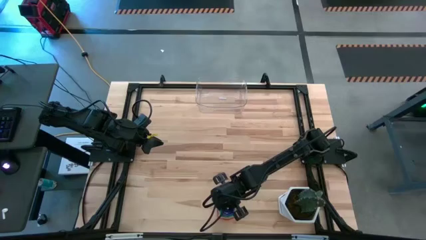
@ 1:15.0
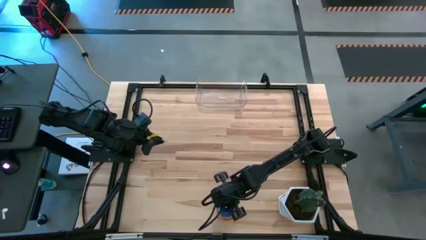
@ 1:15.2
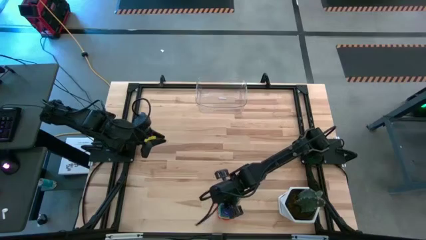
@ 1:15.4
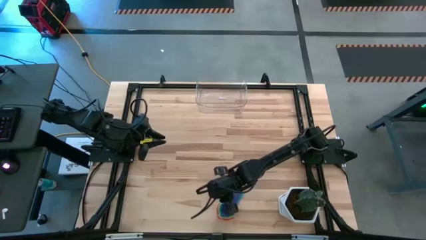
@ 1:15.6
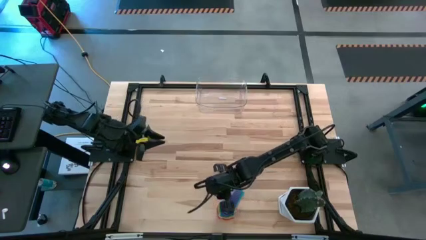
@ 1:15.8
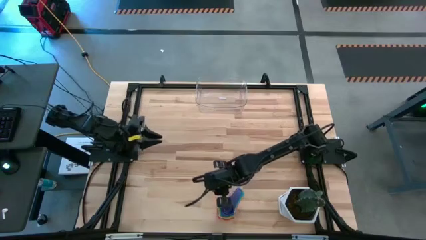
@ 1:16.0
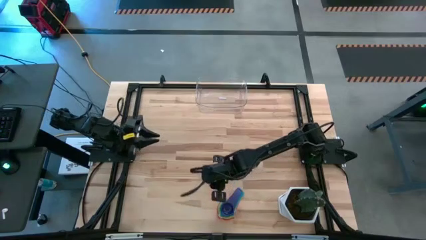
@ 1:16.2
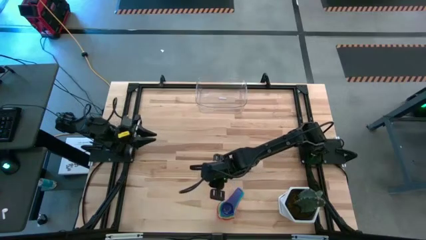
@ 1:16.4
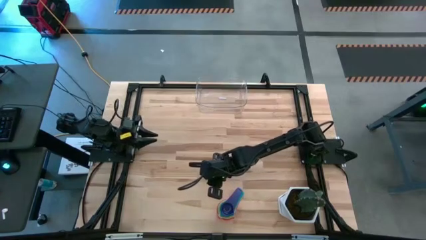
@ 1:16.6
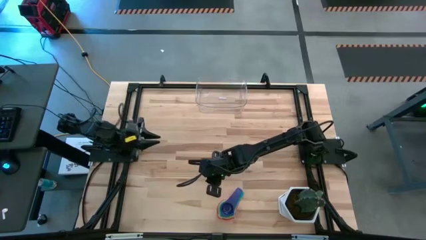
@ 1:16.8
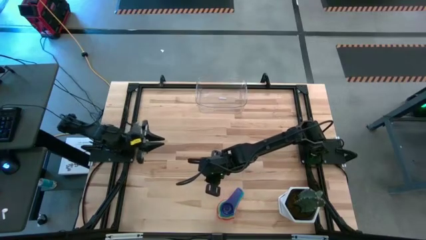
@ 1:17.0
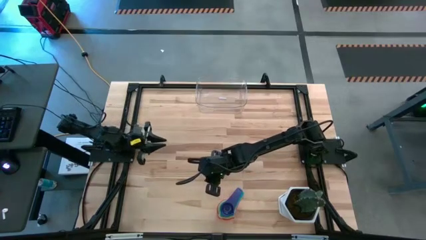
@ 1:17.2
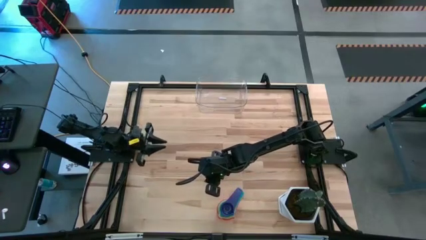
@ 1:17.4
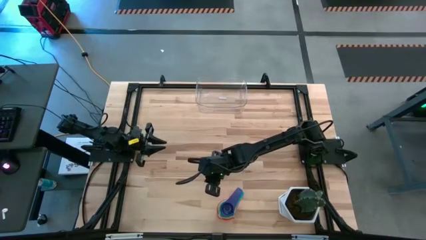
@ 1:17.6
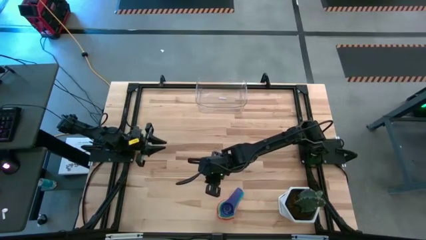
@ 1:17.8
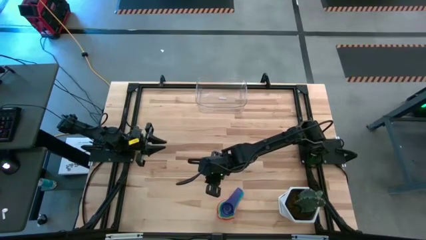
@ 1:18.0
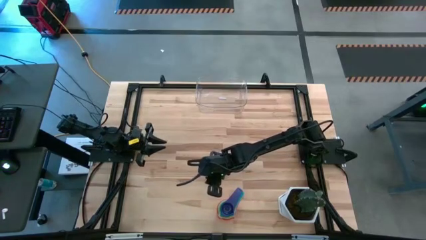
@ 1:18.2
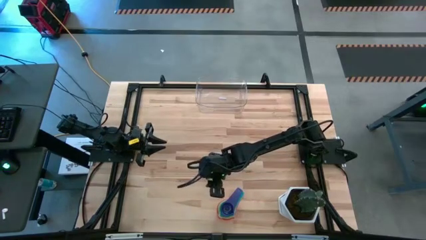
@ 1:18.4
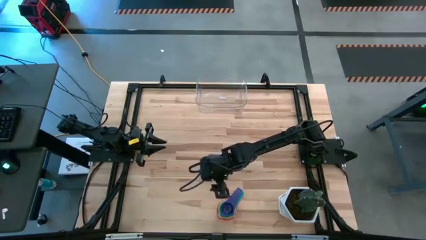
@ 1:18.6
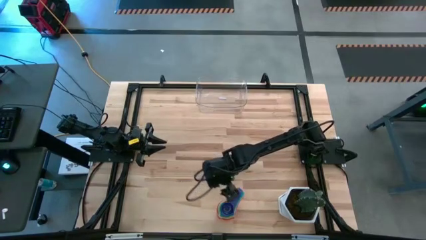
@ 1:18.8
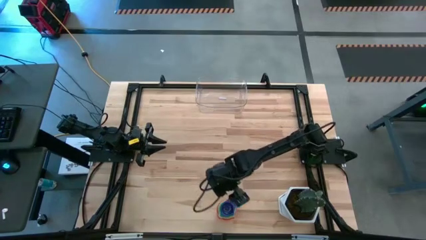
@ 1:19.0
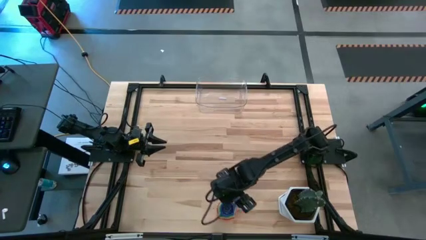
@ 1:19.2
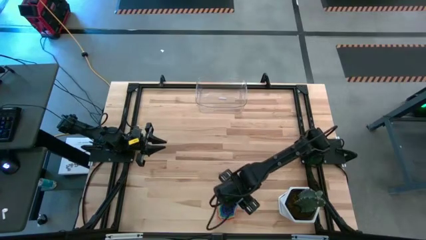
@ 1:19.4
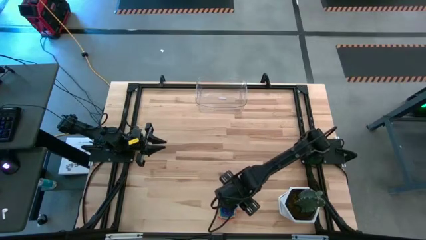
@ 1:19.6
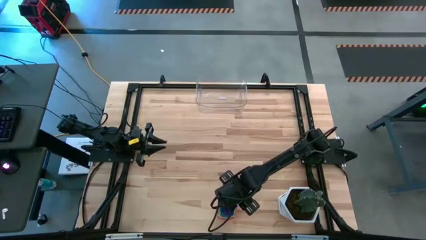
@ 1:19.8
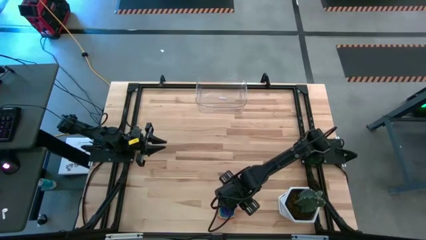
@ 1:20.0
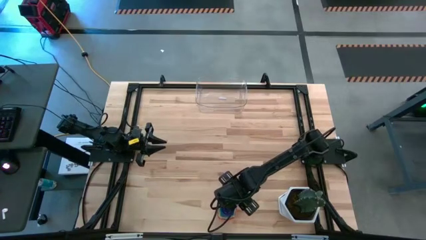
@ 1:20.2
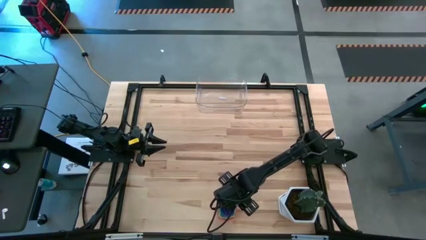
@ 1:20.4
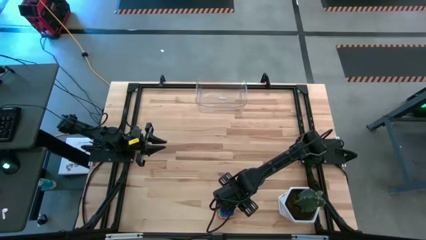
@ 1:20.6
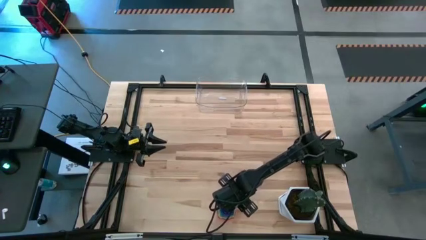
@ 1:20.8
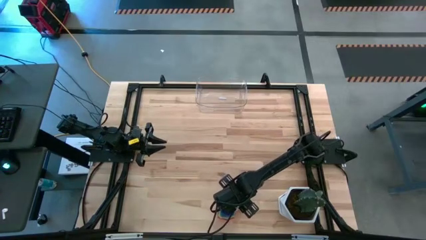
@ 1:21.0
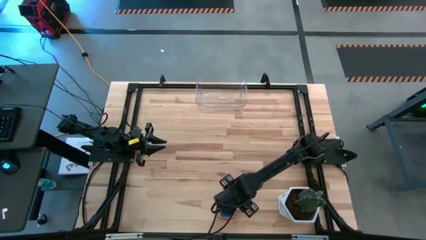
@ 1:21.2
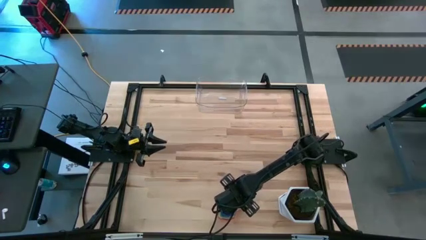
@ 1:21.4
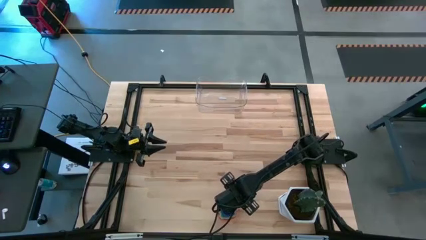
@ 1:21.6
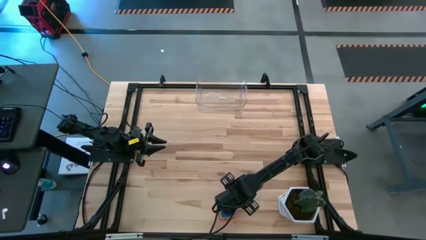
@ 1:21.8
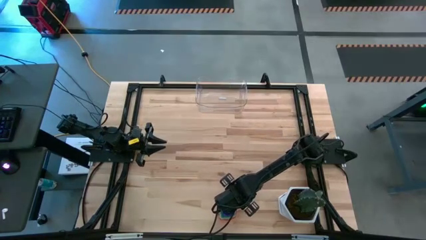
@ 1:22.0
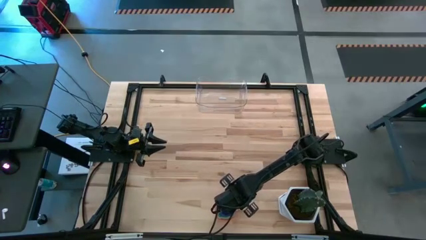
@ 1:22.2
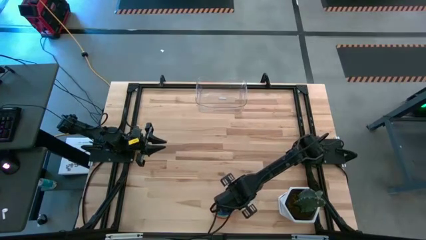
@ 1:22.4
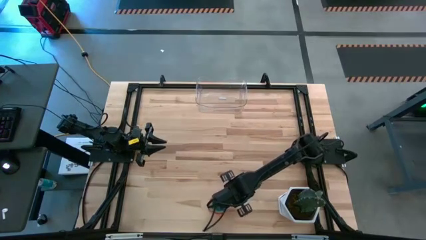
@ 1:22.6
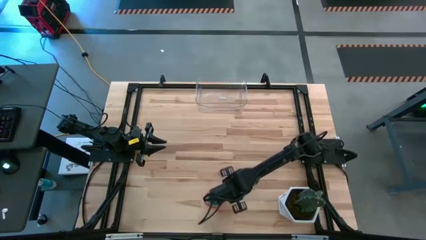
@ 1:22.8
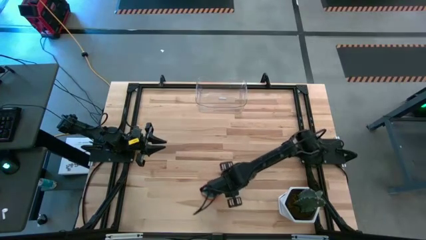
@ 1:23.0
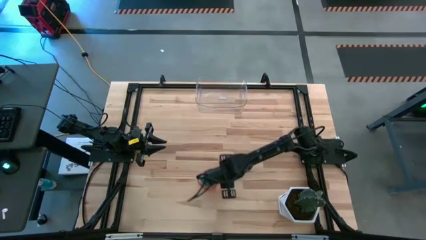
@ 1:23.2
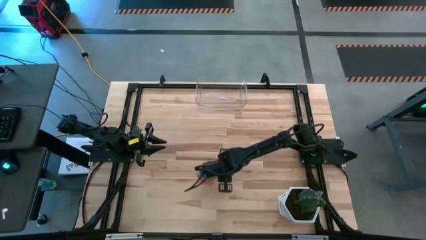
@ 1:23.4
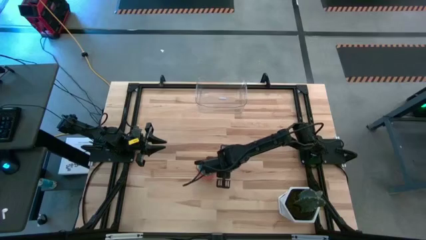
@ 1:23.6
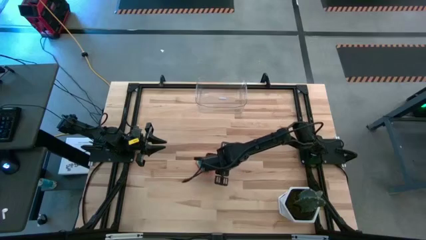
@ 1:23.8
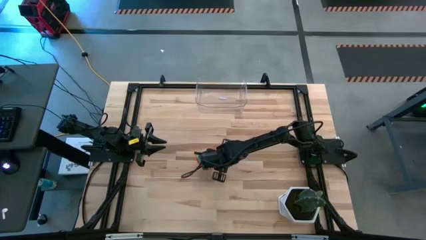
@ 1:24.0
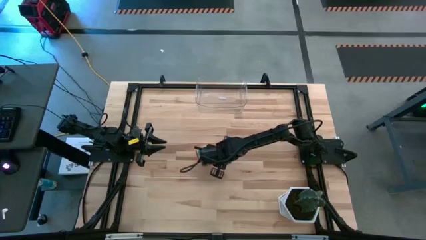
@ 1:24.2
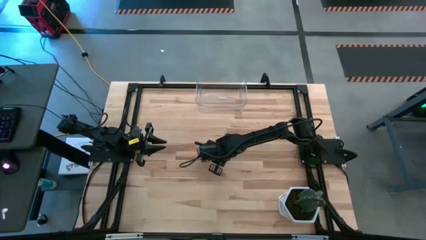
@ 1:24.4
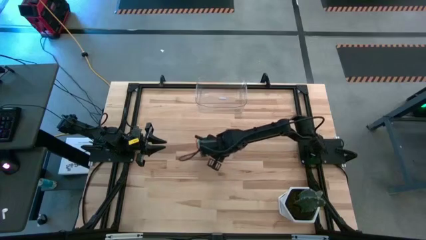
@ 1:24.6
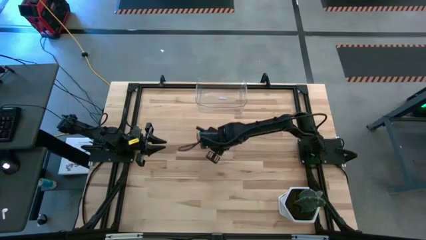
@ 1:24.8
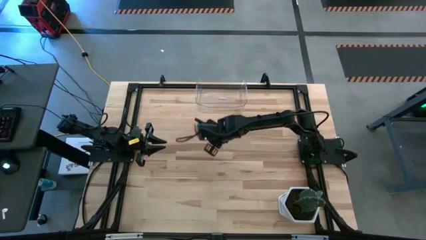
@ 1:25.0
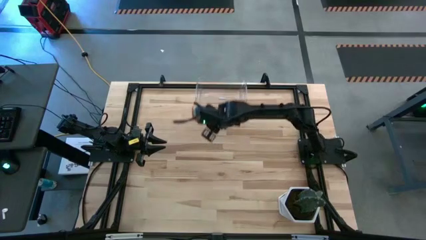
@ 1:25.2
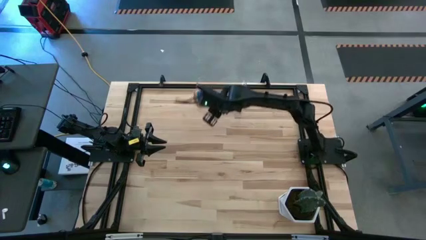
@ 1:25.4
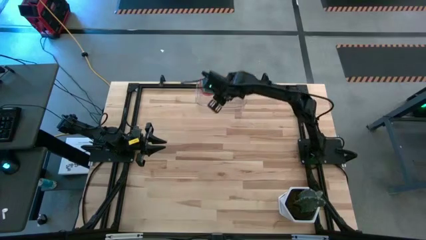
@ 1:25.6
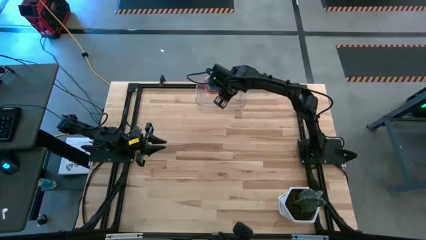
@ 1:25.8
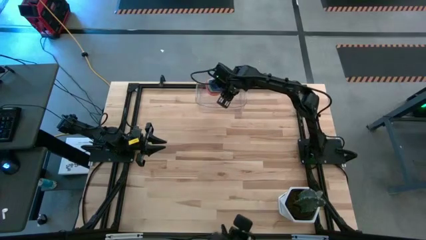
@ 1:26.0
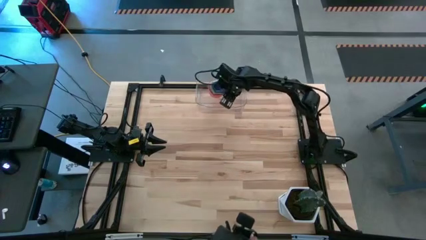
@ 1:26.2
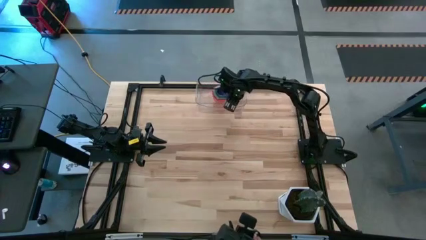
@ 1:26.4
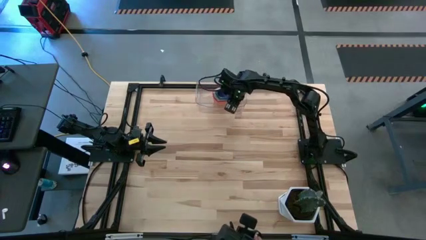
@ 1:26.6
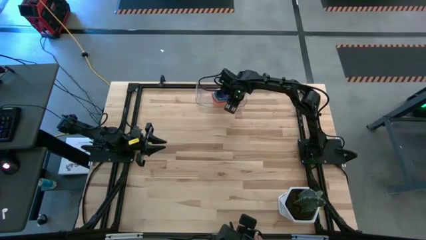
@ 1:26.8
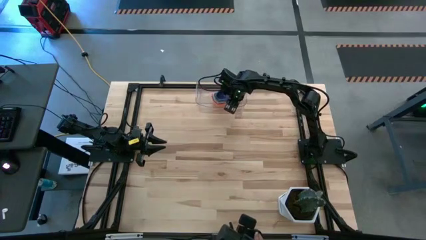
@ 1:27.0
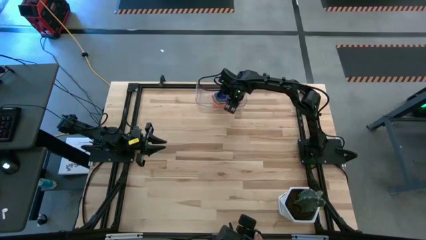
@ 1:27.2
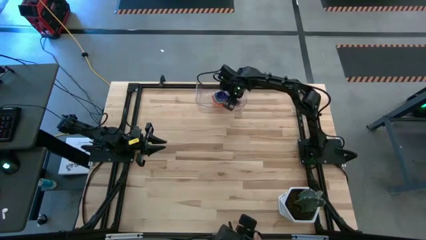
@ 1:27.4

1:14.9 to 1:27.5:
Task: Nest measuring cups in basket
Put the stacked measuring cups into the transparent bin

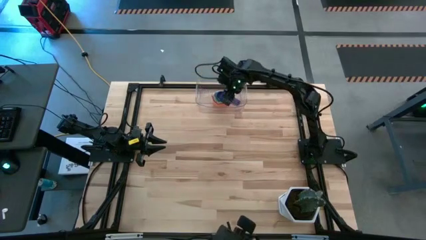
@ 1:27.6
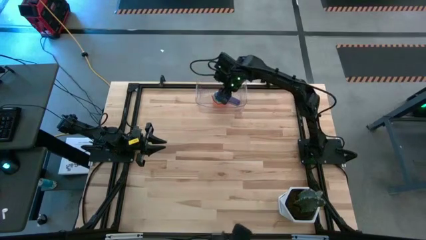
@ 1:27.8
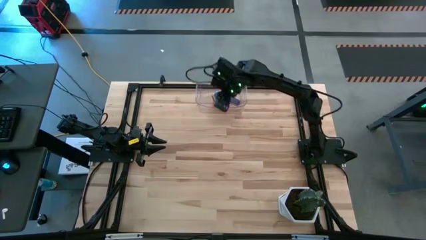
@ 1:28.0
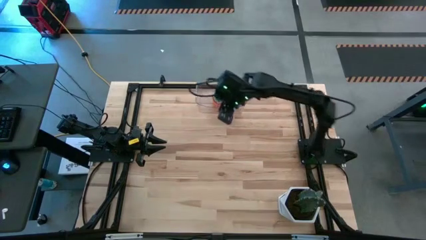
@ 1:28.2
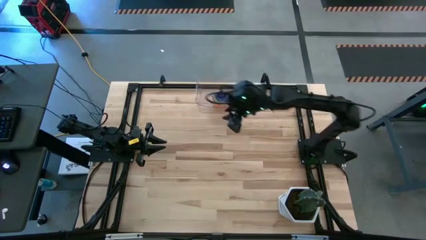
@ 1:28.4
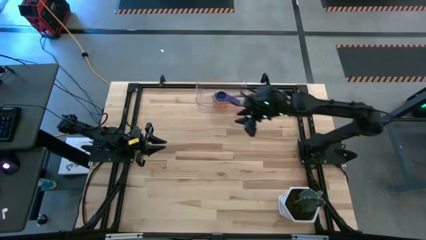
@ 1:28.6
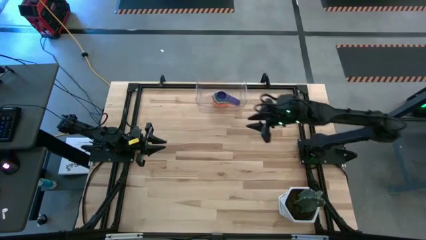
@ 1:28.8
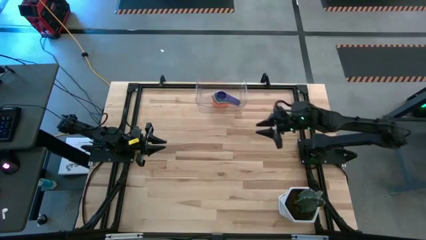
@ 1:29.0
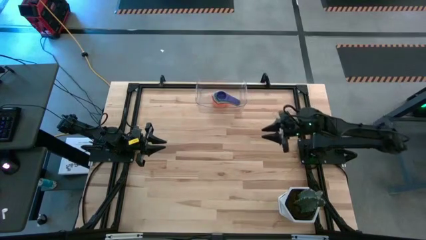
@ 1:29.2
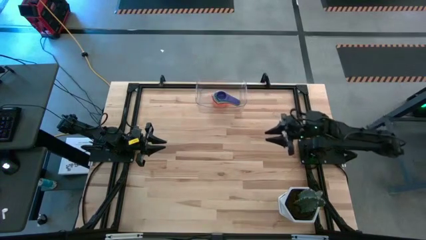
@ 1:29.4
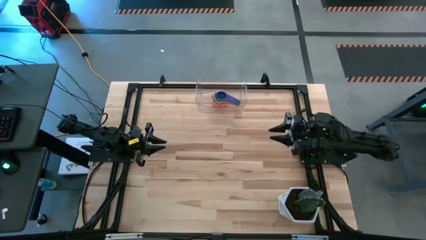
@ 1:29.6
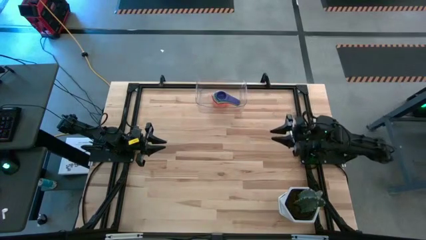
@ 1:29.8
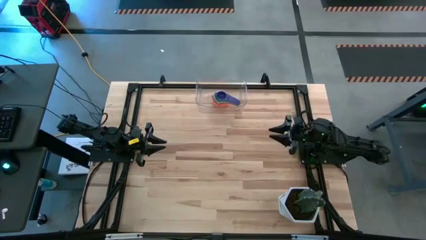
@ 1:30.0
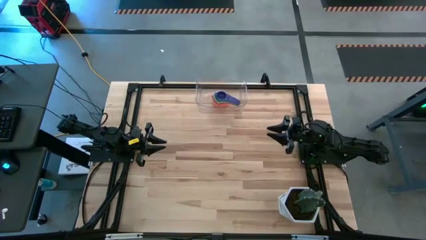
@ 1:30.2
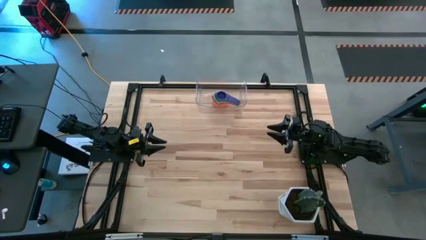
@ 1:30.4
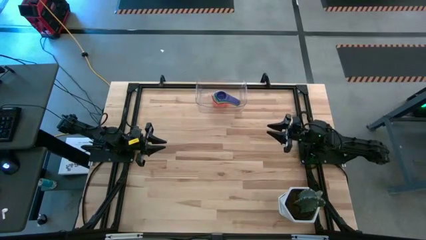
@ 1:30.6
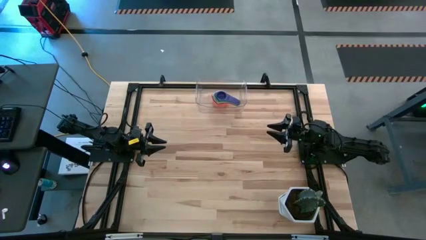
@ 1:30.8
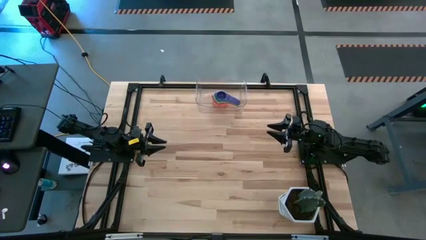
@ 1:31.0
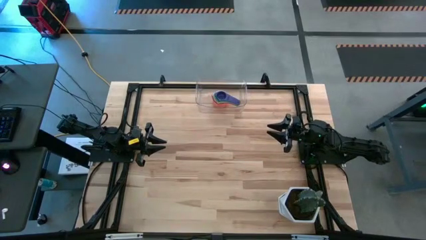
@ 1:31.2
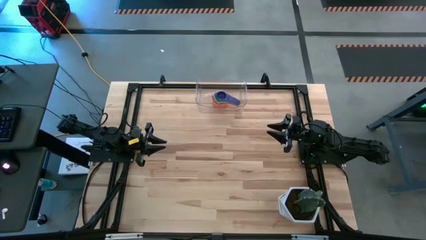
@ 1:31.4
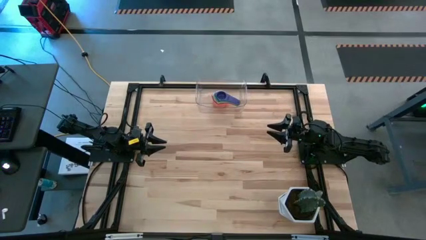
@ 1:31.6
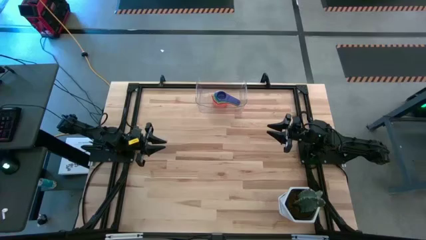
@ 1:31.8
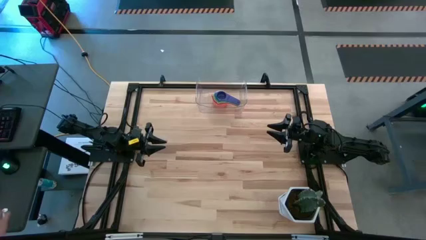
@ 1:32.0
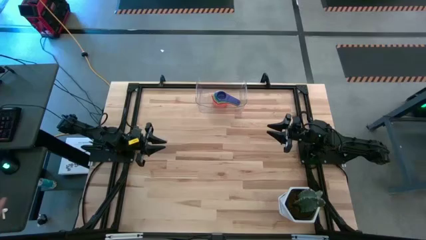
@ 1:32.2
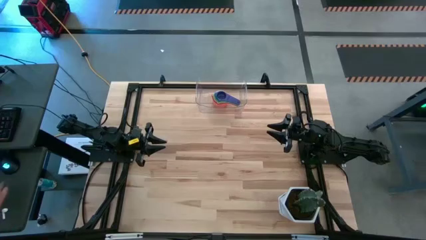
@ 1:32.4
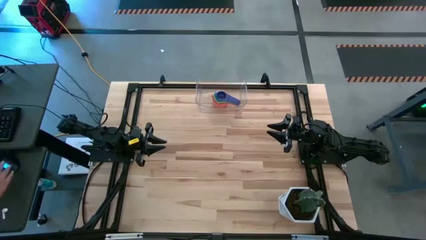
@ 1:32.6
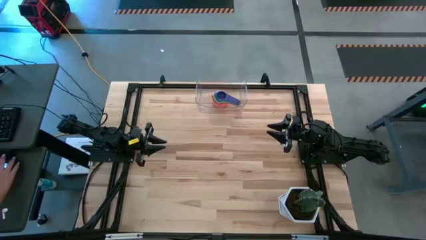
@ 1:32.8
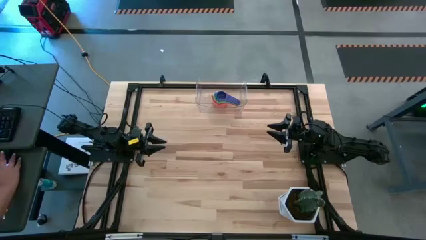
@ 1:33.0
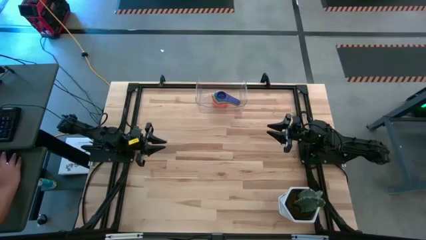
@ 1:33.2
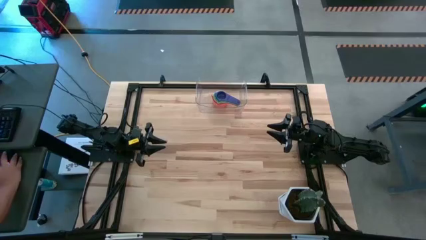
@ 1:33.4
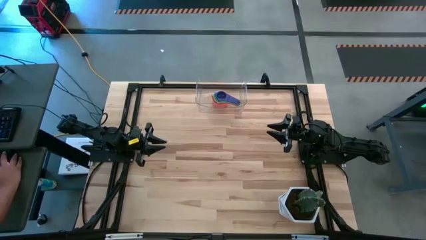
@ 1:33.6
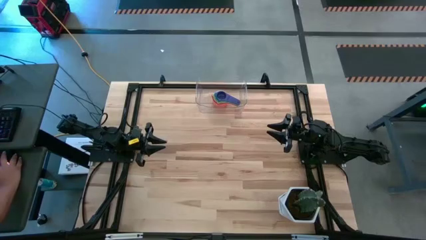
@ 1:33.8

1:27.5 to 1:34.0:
Return to Home Position
